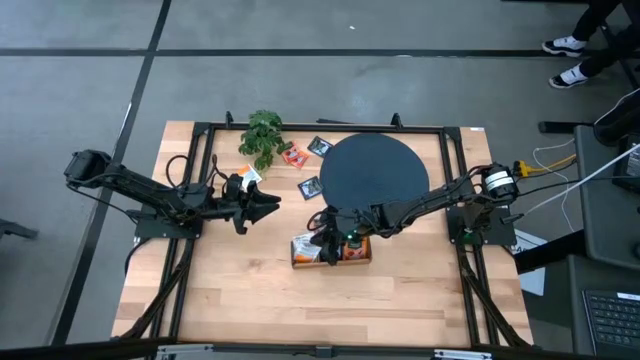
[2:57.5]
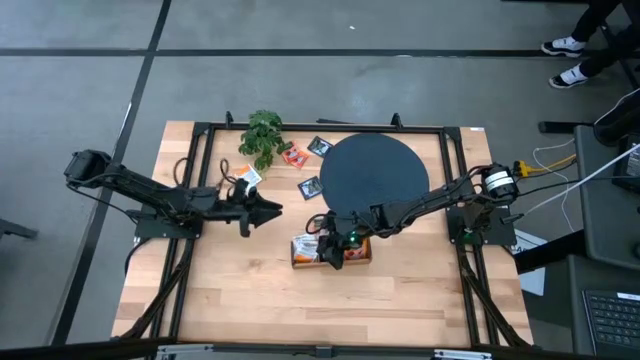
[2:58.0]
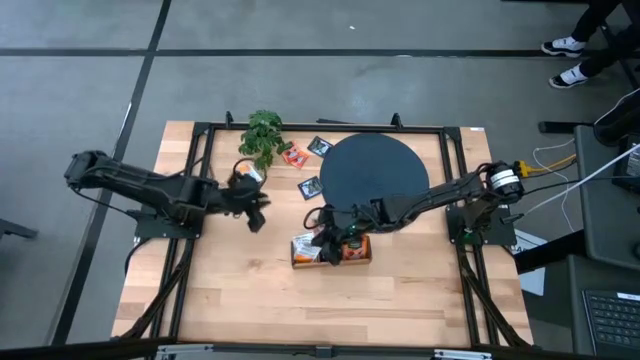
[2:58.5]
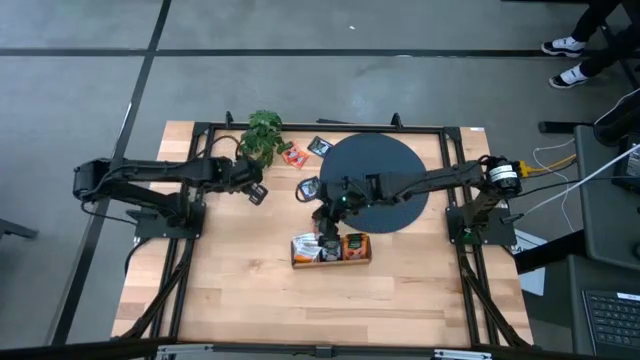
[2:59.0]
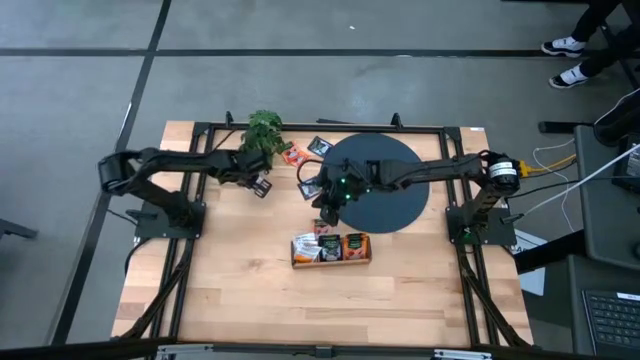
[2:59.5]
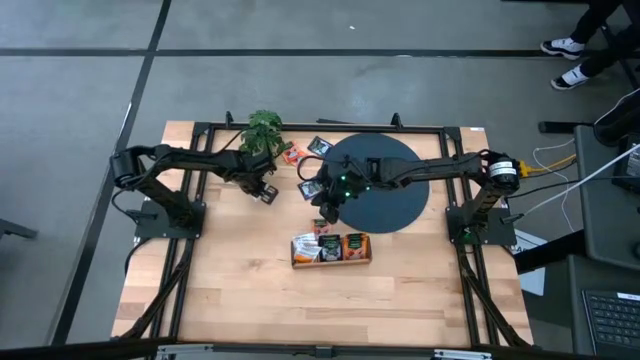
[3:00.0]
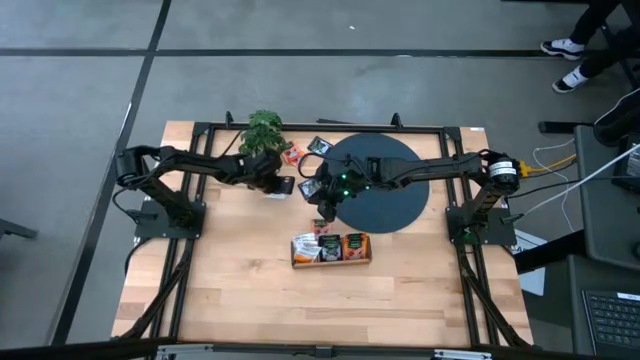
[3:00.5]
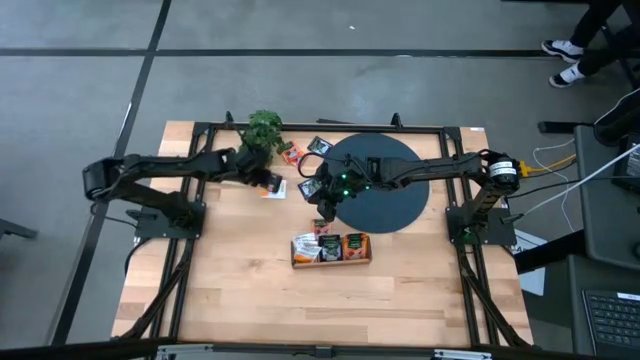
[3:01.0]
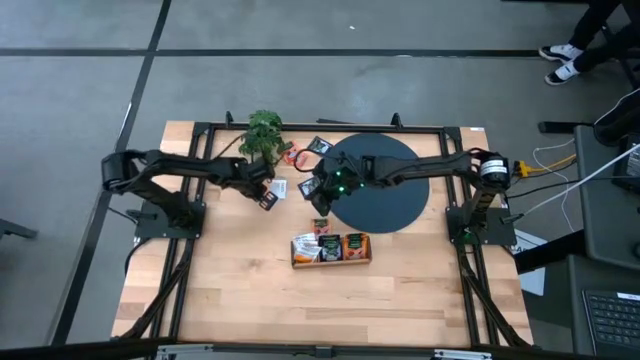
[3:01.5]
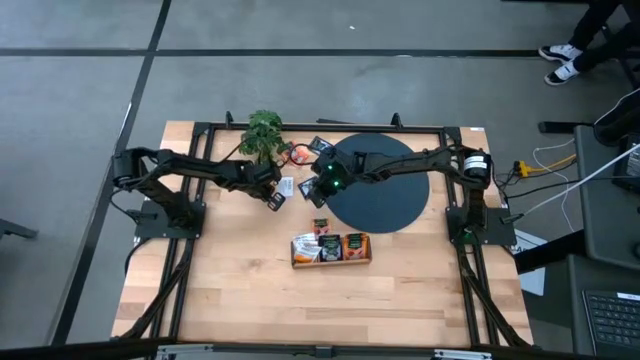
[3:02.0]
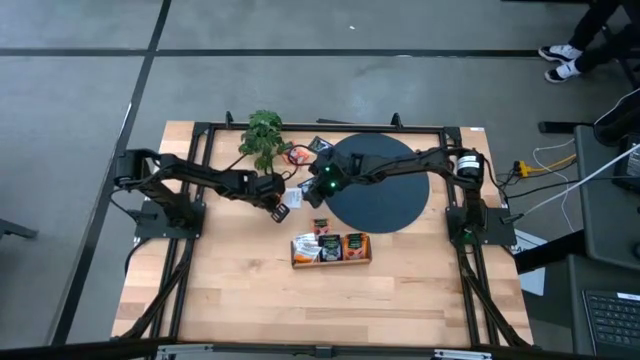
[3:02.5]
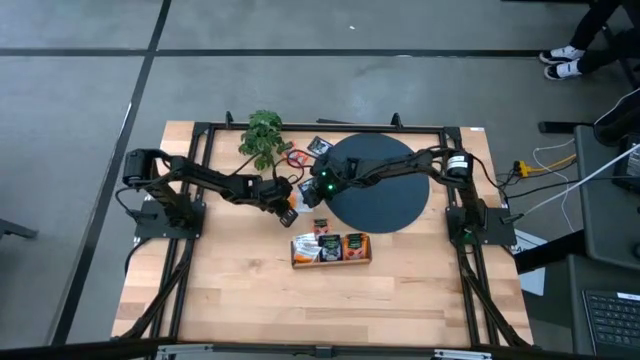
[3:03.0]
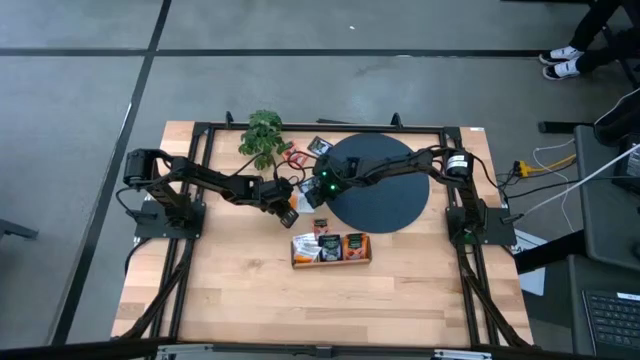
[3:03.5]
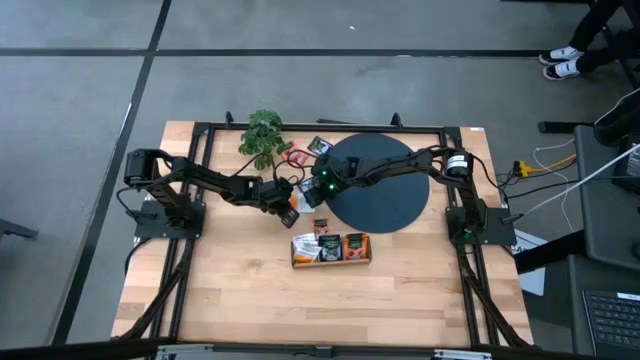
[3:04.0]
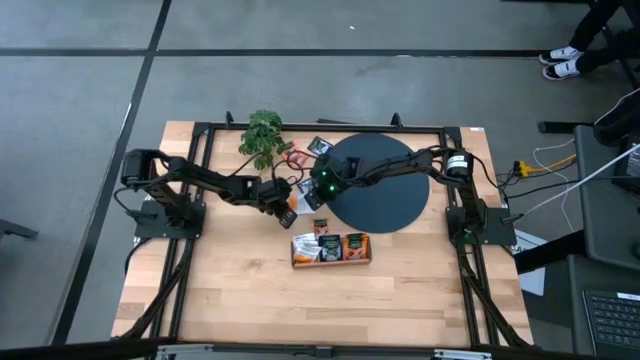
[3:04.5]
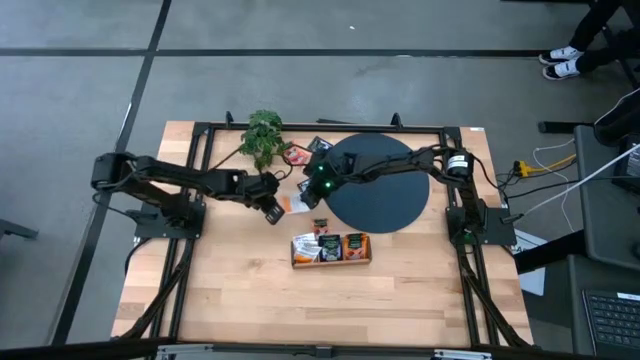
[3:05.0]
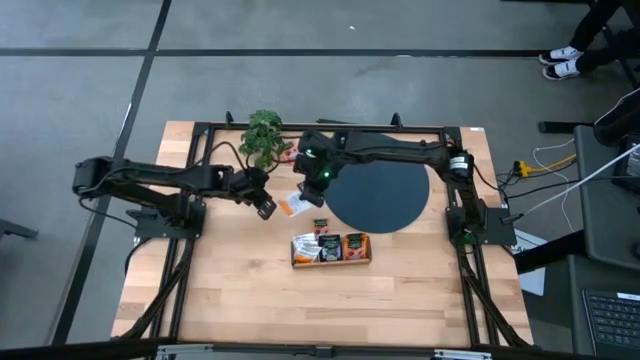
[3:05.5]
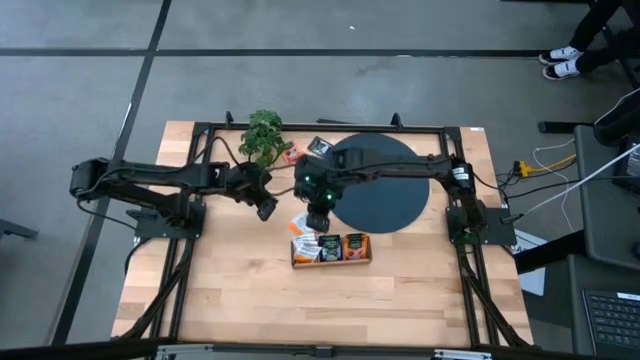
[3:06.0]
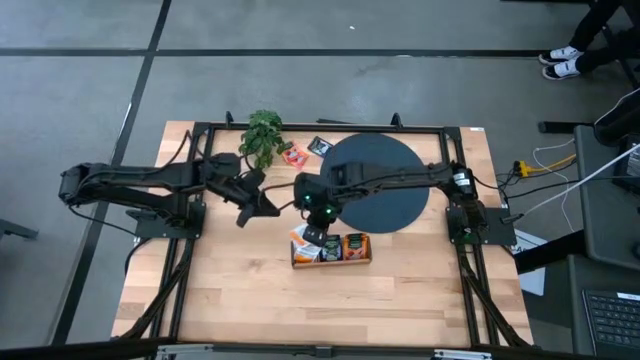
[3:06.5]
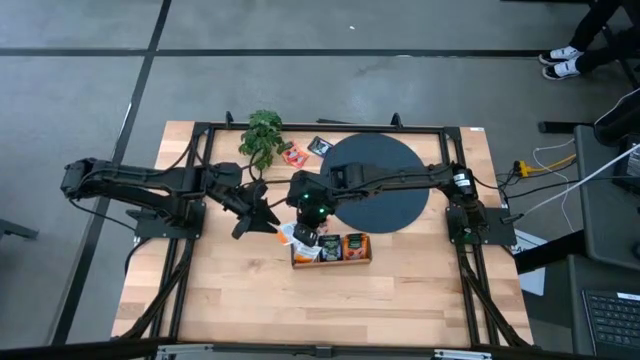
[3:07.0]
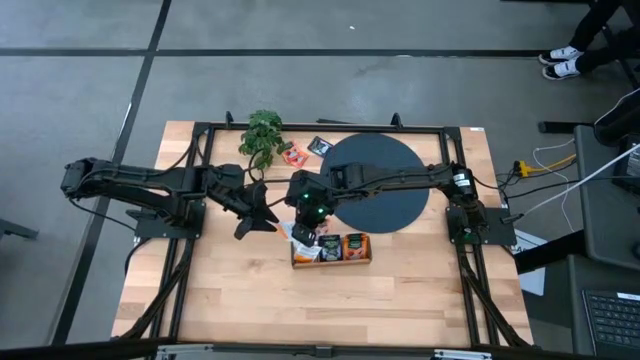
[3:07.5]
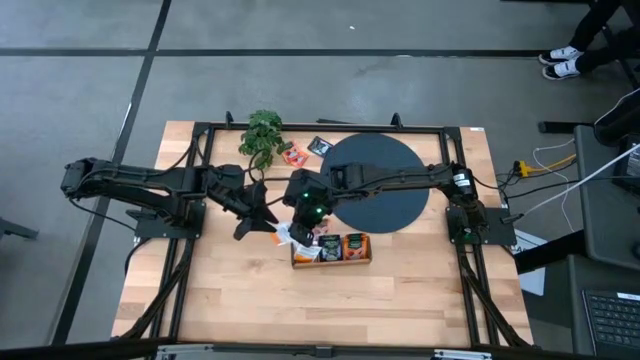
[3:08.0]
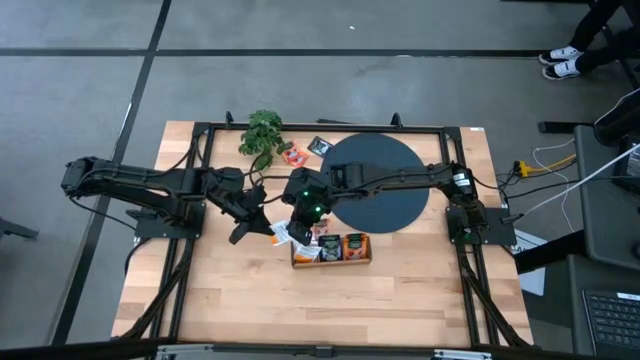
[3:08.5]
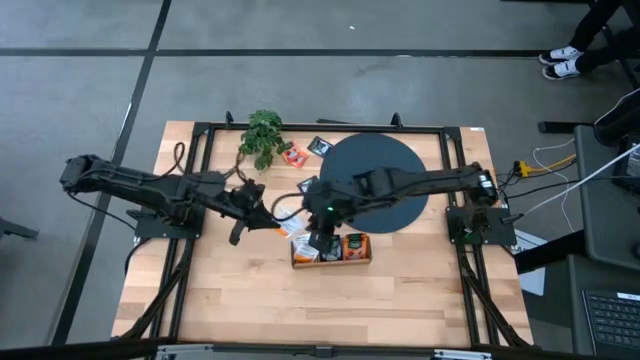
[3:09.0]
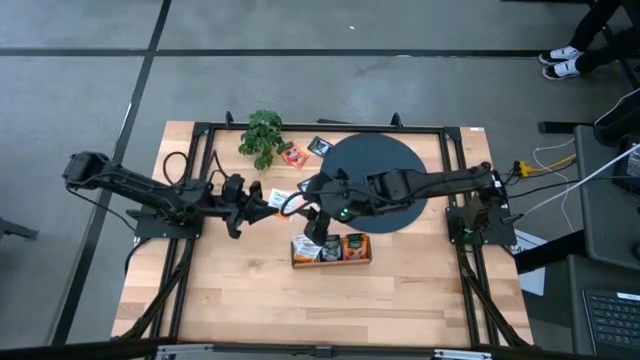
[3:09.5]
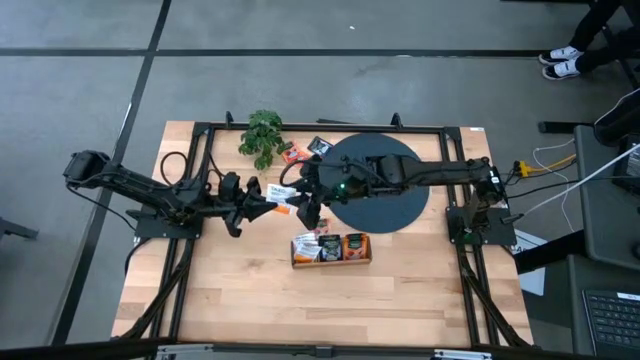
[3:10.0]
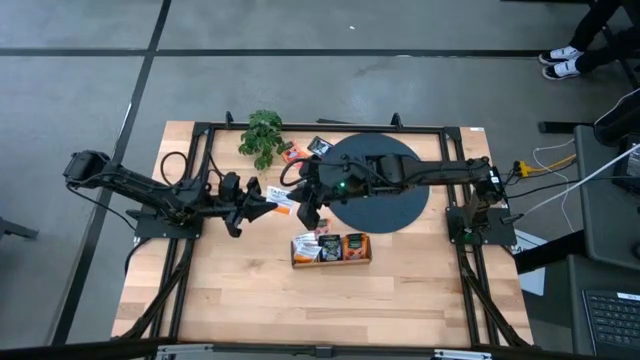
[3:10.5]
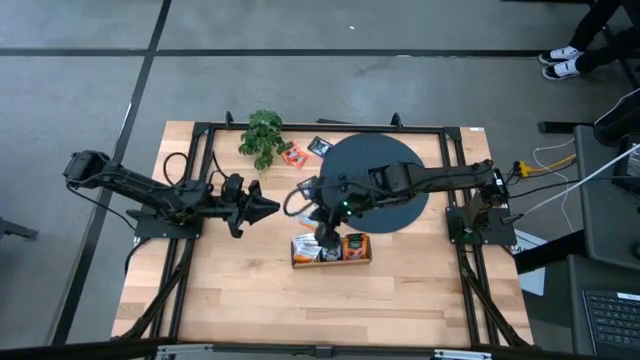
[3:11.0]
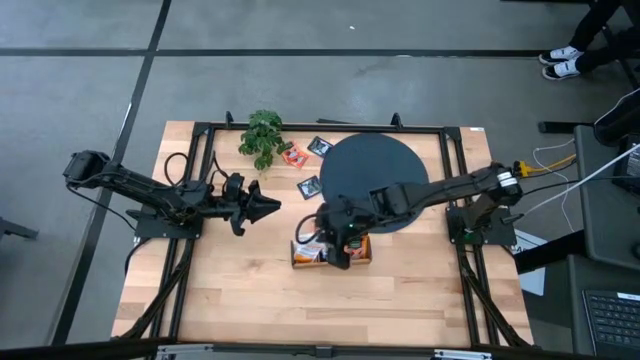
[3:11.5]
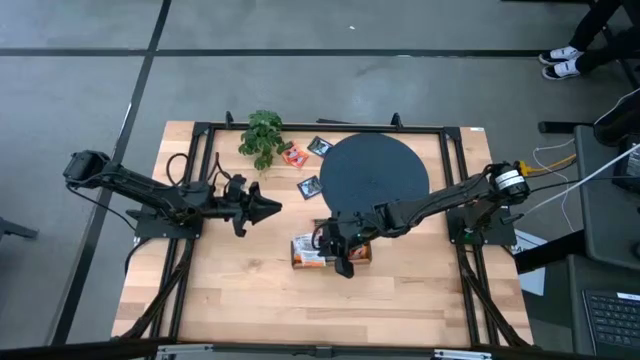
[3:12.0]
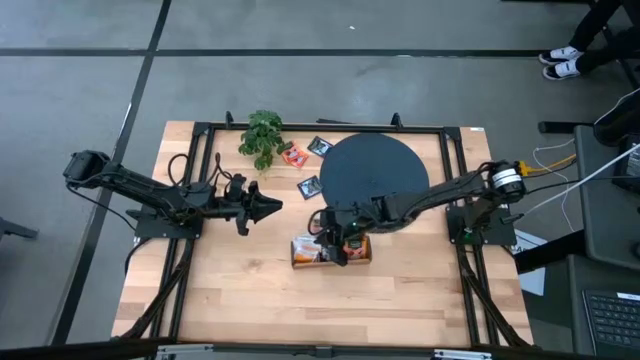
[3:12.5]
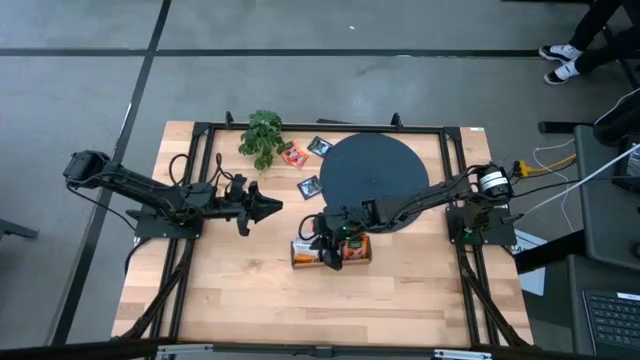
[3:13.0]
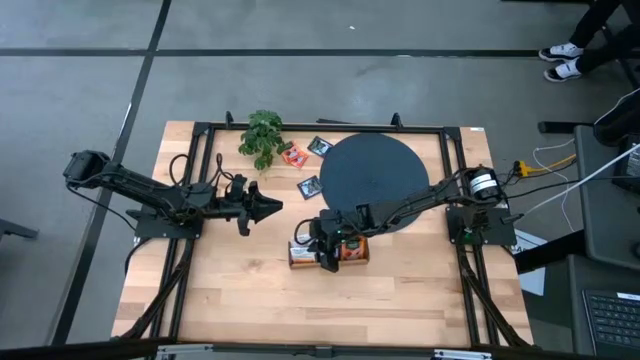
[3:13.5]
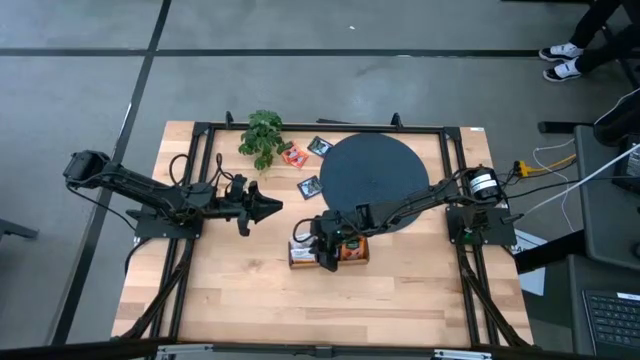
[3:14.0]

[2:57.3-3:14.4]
Task: Pick & Place Tea
Put the white tea bag into the left section of the wooden organizer

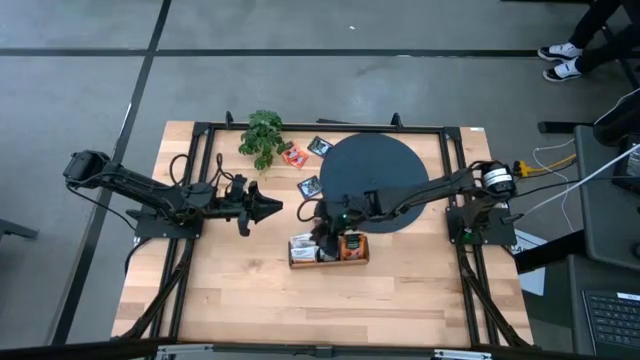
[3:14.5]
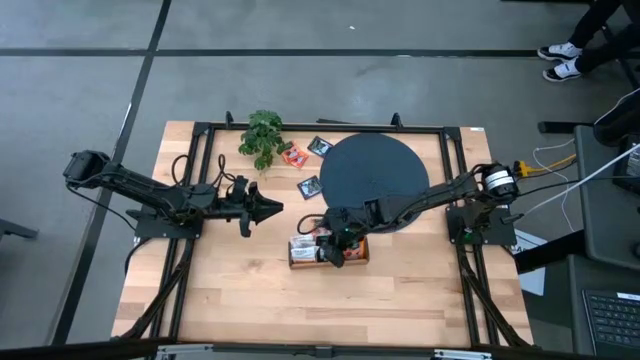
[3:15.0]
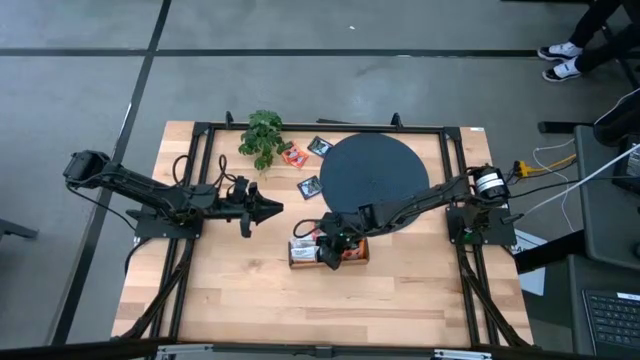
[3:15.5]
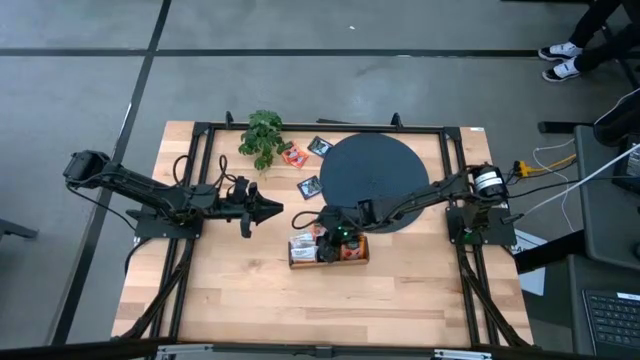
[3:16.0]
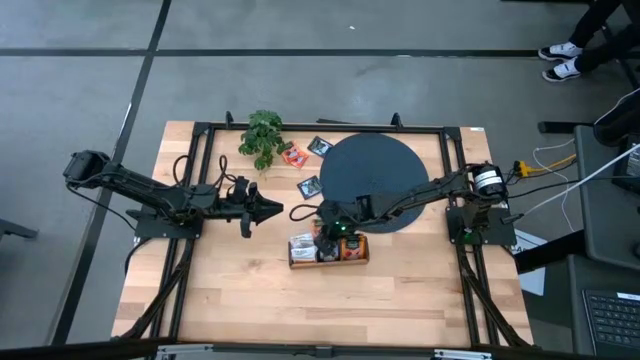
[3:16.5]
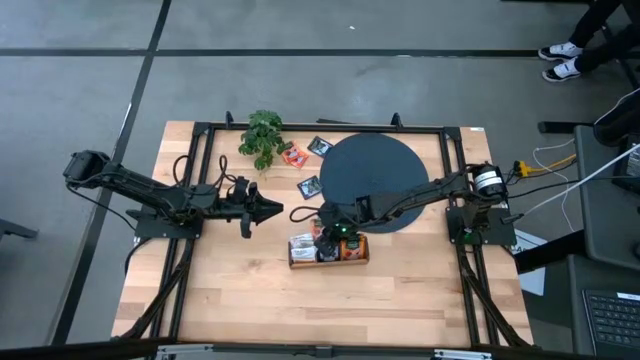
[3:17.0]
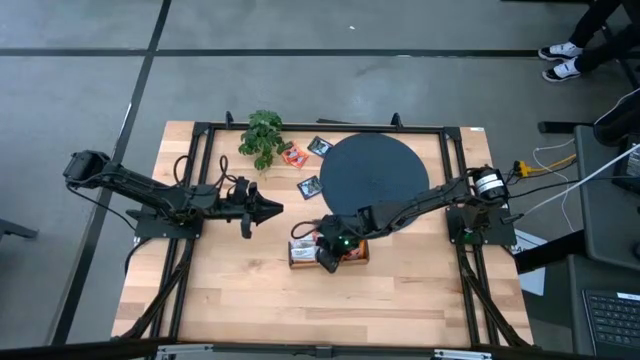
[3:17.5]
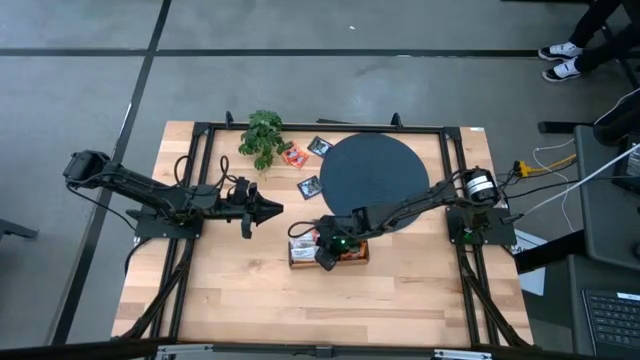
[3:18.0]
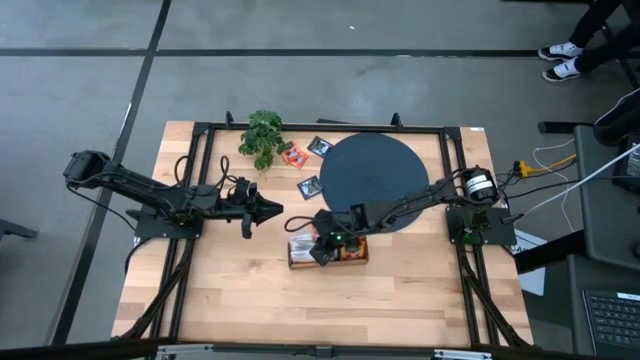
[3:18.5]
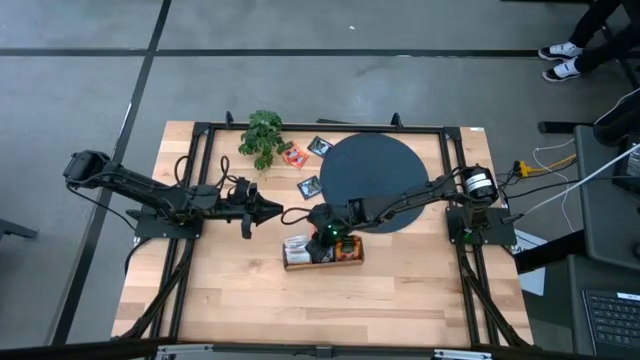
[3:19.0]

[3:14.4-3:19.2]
Adjust the white tea bags in the wooden organizer
